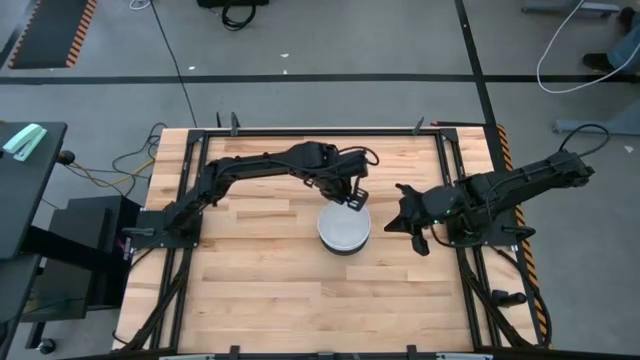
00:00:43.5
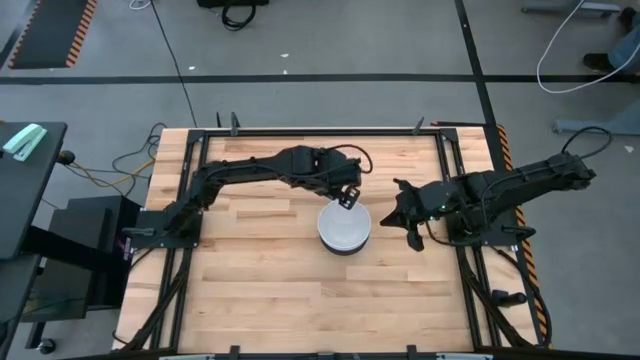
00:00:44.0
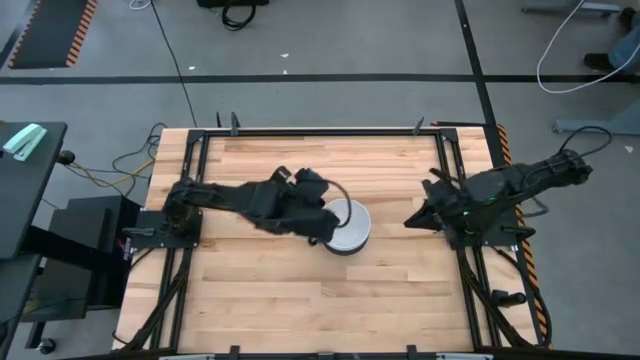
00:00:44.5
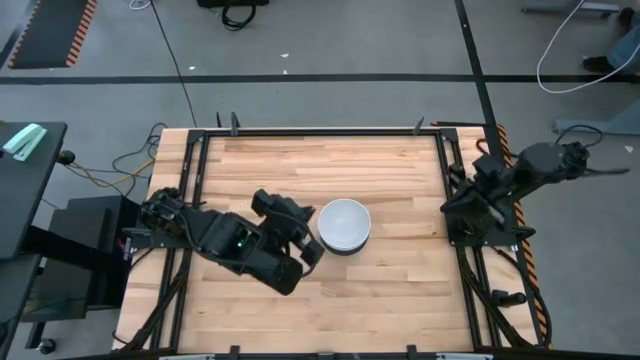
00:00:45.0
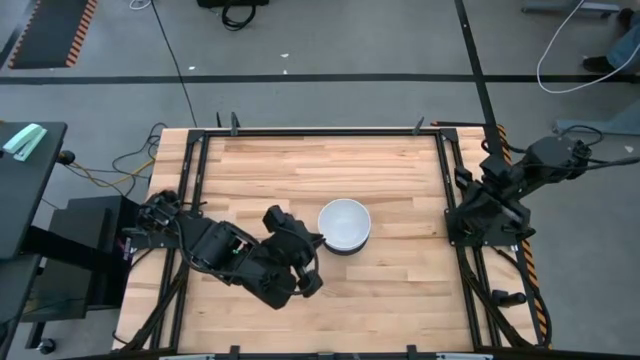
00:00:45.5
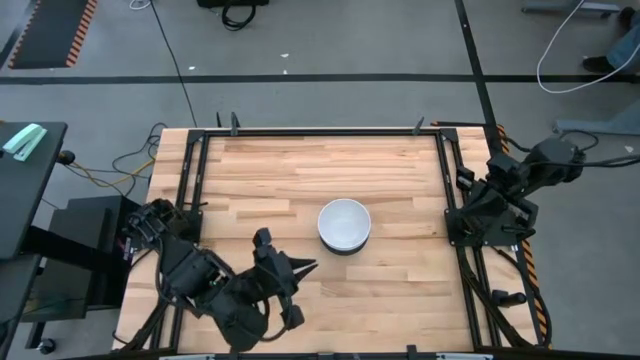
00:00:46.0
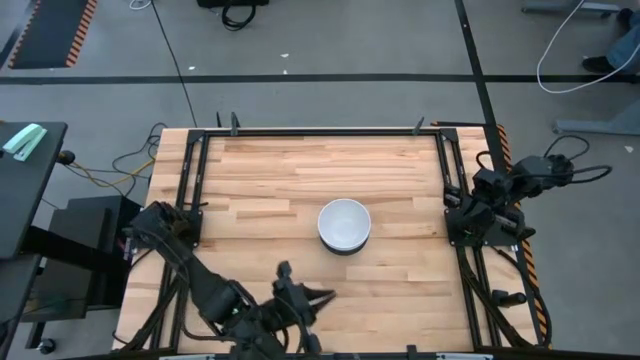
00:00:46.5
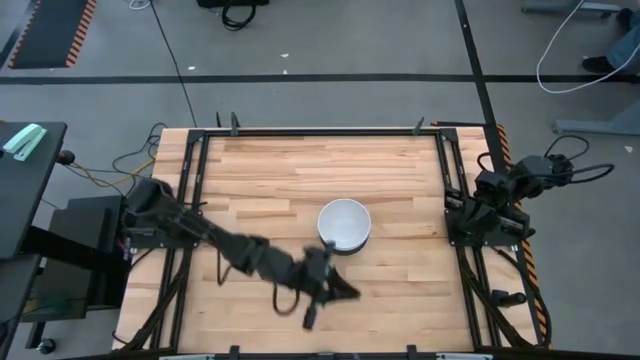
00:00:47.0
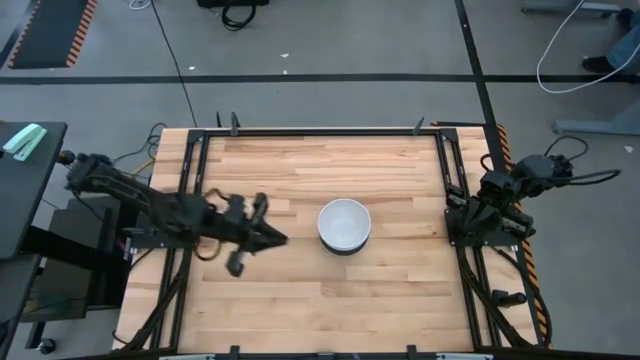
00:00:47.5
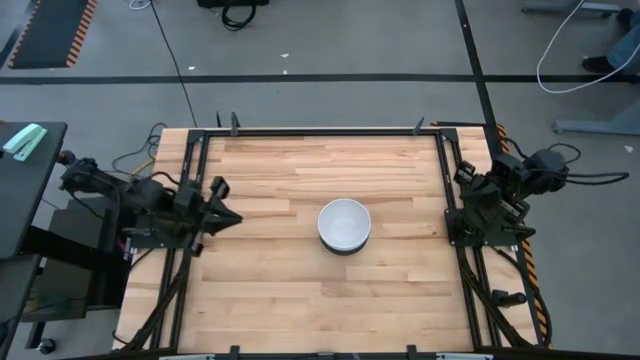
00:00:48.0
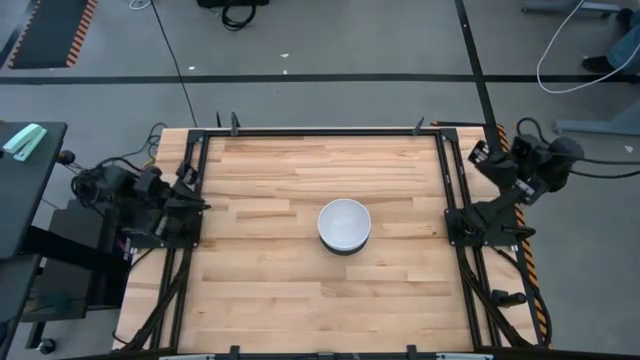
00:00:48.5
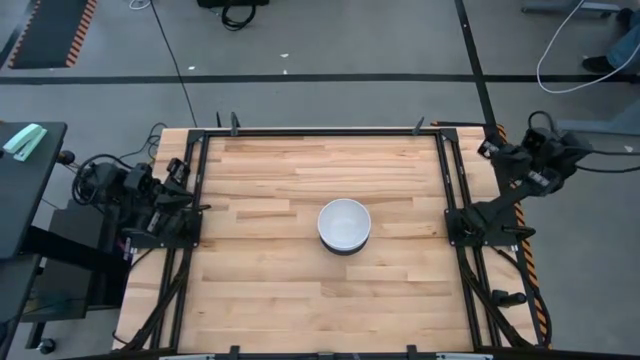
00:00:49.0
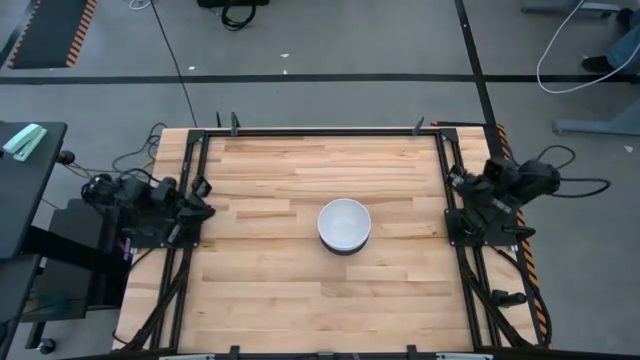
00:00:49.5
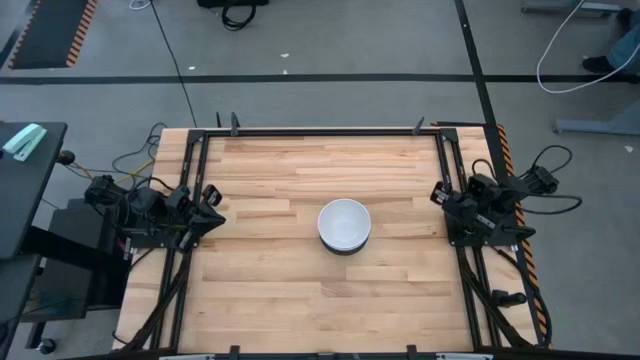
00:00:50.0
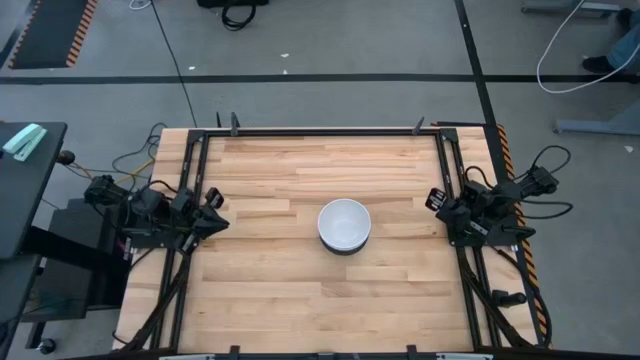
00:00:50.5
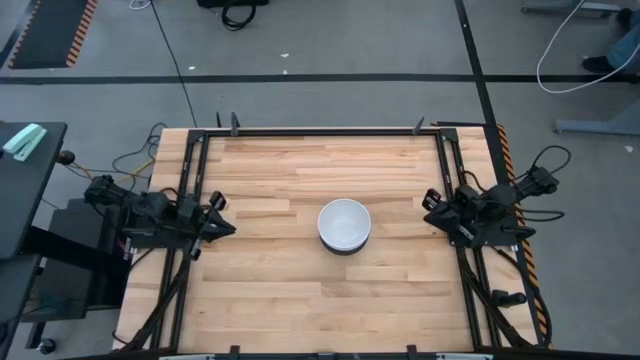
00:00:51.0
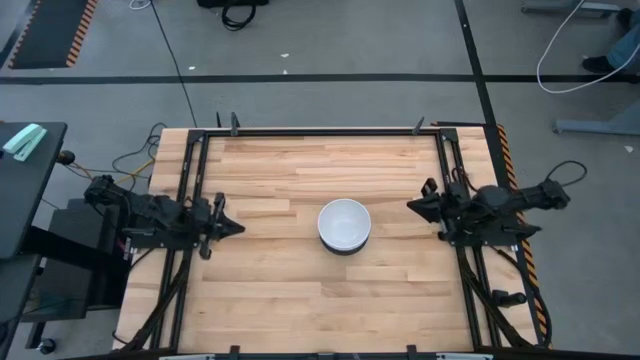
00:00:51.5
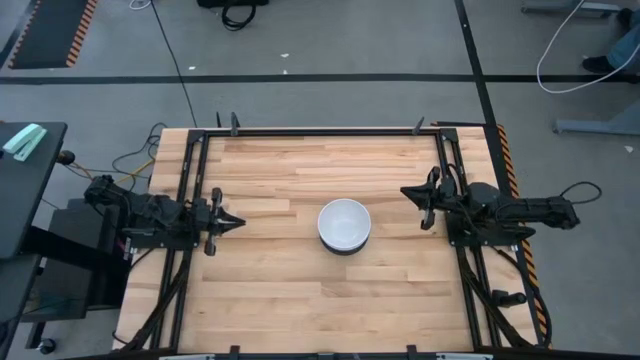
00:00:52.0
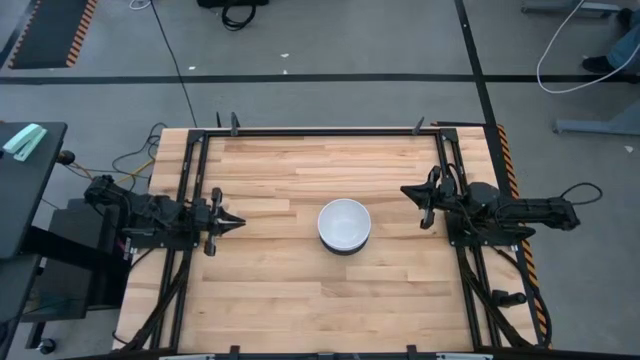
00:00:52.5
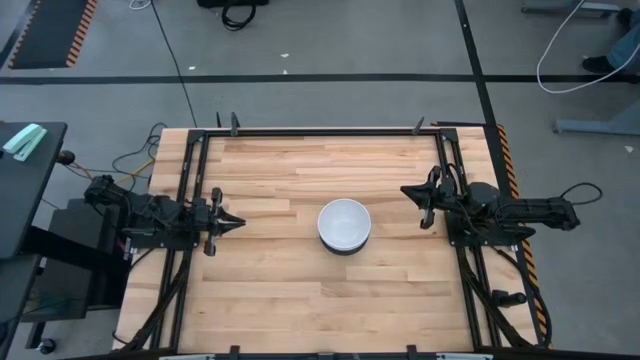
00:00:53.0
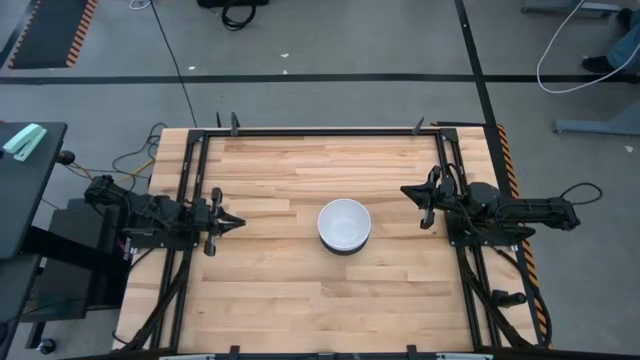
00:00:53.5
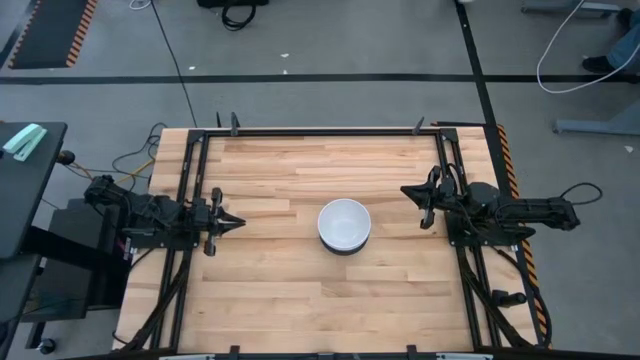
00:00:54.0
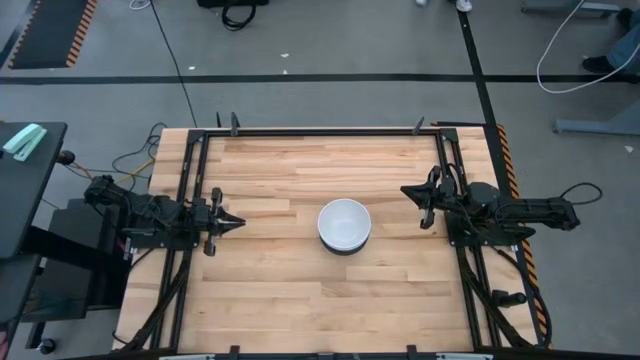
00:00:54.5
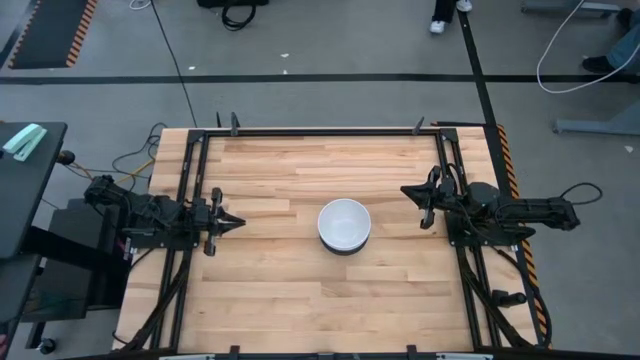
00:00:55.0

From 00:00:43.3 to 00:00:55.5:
Task: Nest bowls inside each other
Return to Home Position

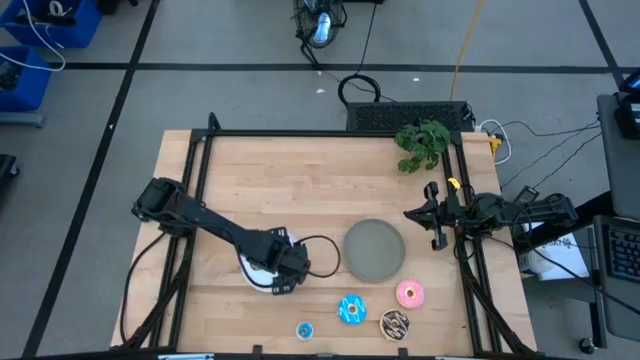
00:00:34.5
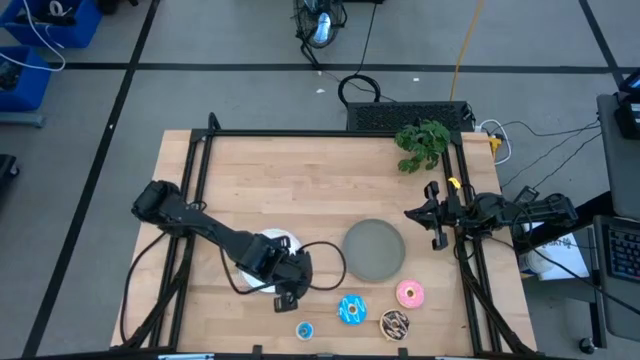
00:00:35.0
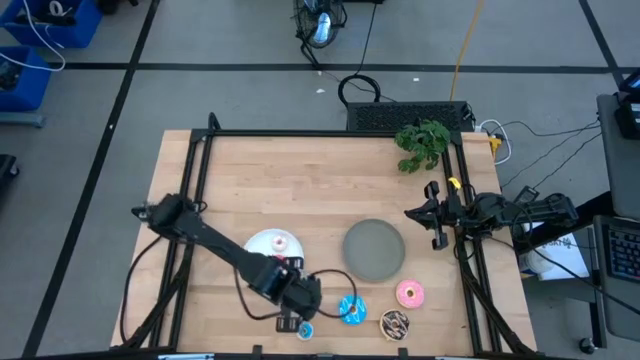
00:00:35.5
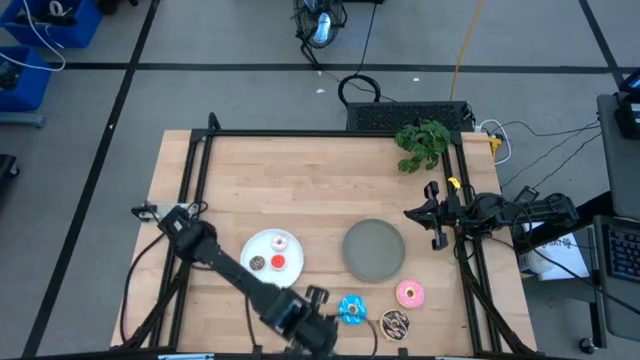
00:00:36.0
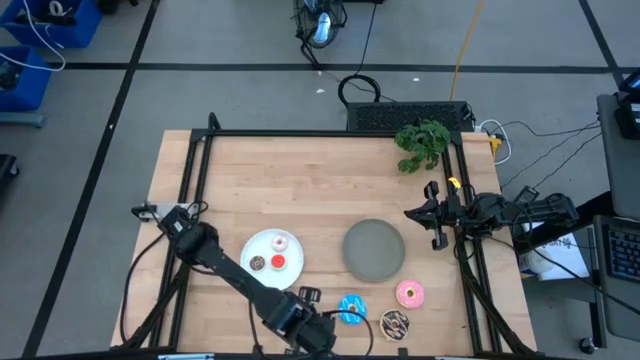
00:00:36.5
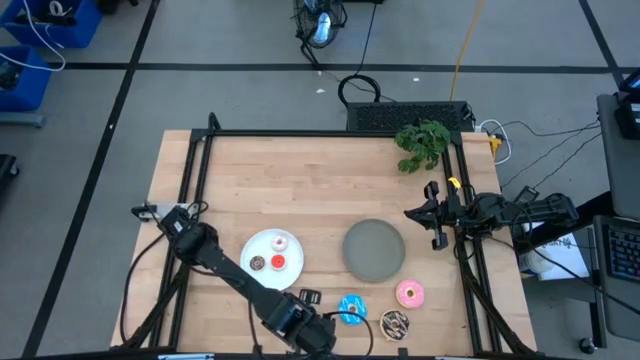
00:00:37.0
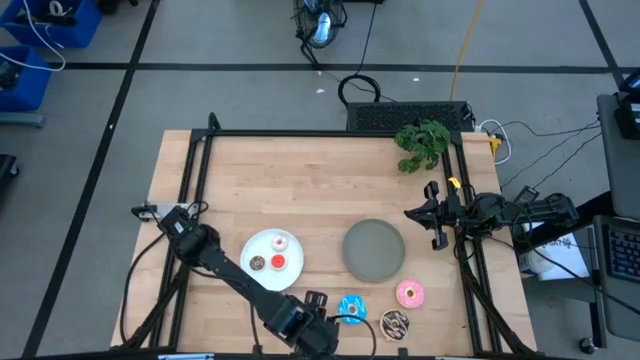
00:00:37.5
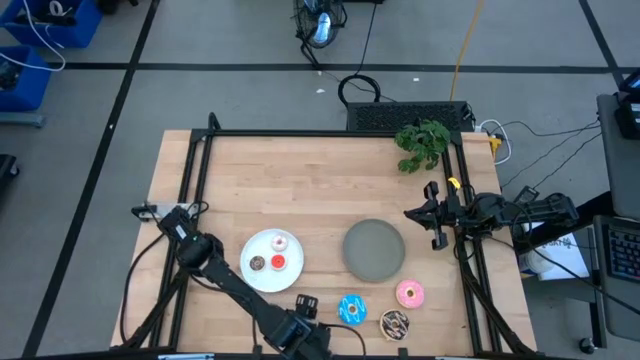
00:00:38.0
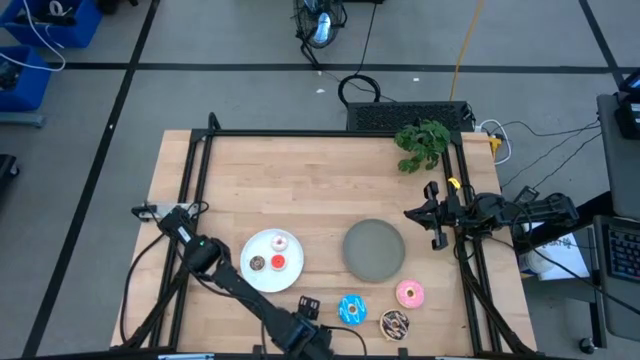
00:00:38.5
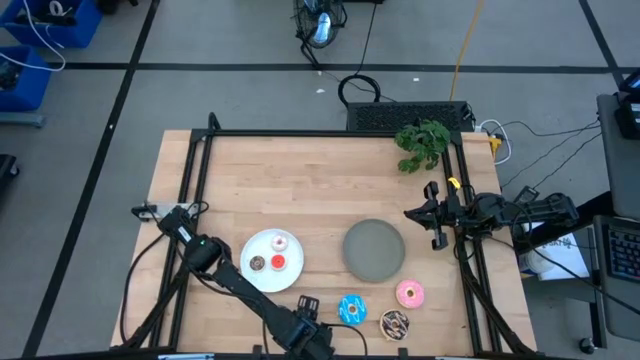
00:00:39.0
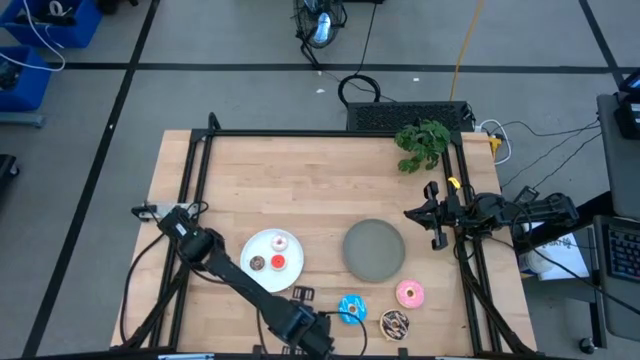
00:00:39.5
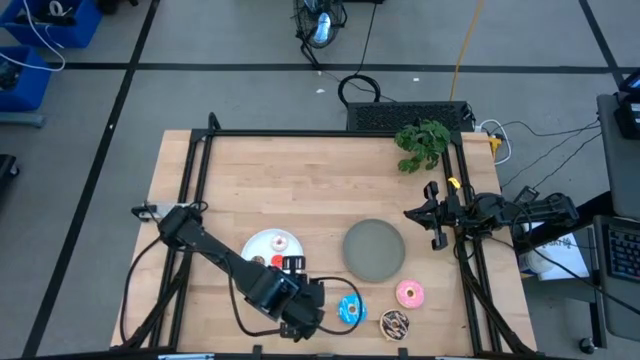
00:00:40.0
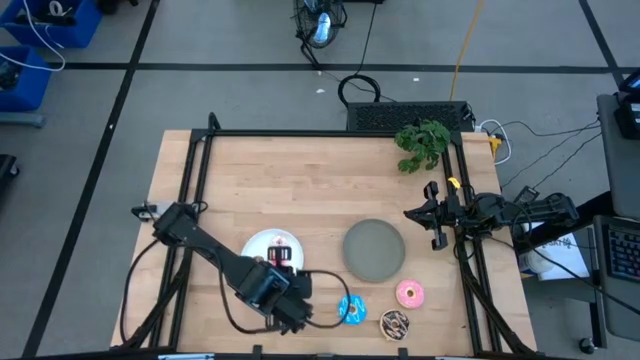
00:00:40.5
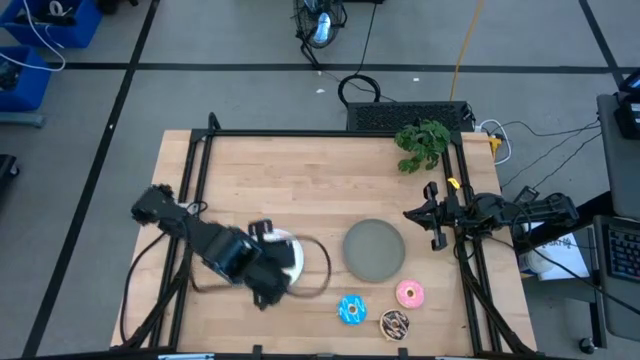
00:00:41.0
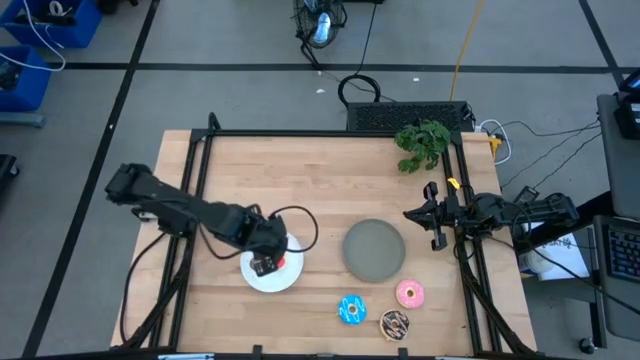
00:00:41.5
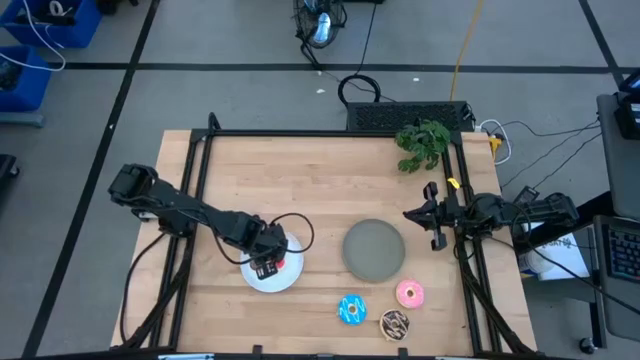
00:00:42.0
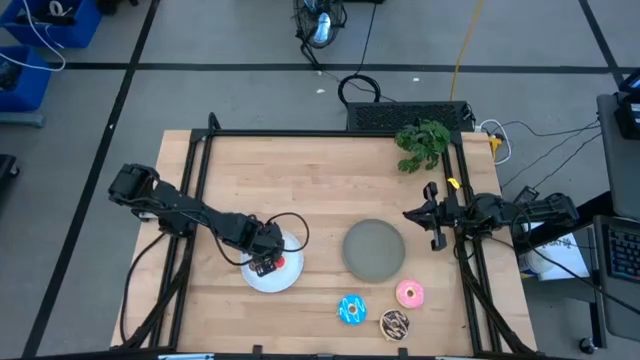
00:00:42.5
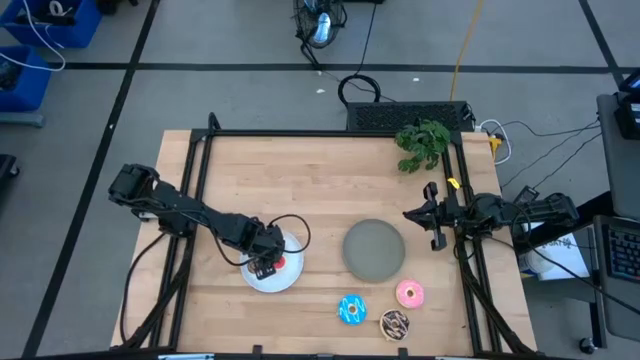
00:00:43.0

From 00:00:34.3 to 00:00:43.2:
Task: Pick & Place donuts
Put the small blue donut on the white plate
